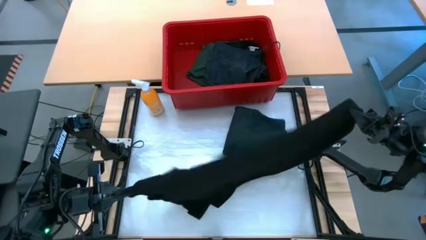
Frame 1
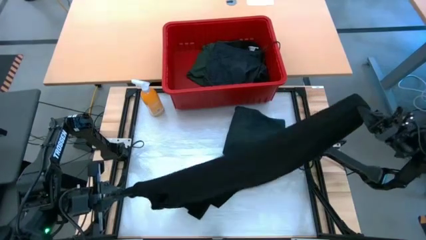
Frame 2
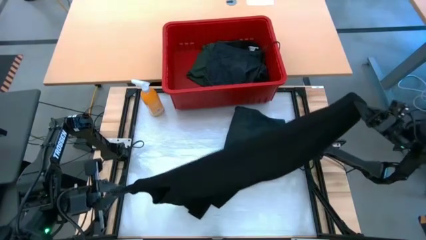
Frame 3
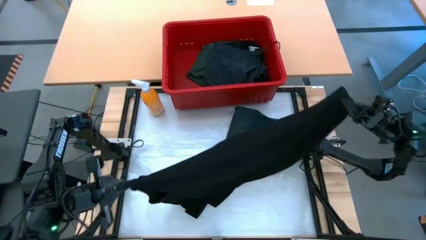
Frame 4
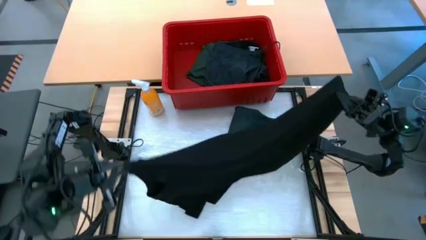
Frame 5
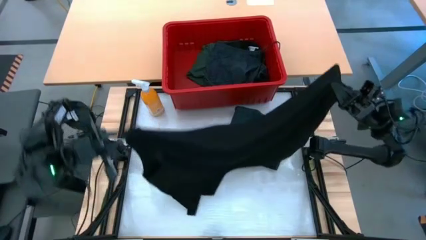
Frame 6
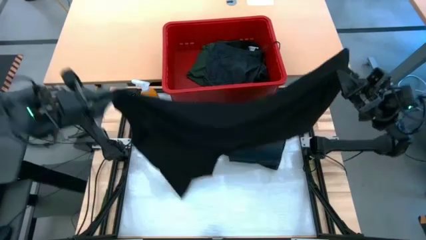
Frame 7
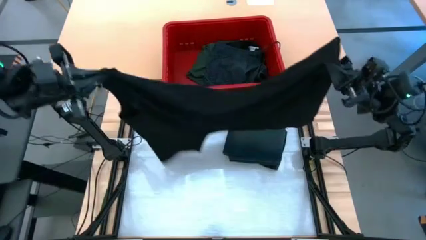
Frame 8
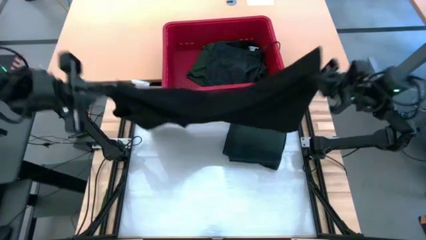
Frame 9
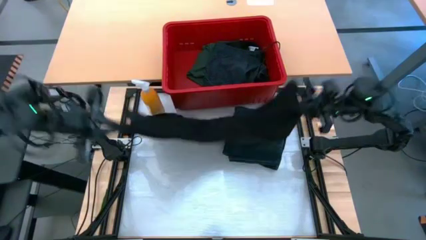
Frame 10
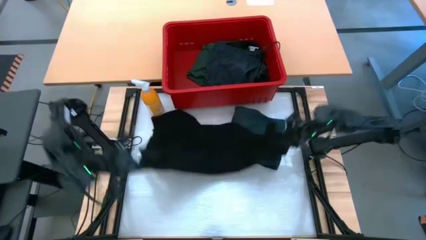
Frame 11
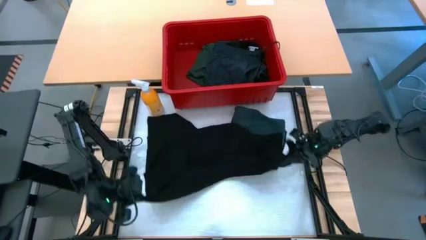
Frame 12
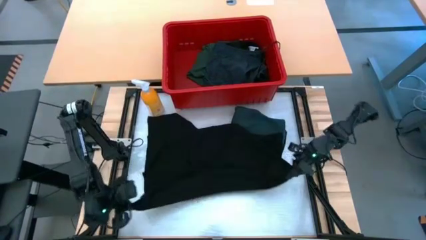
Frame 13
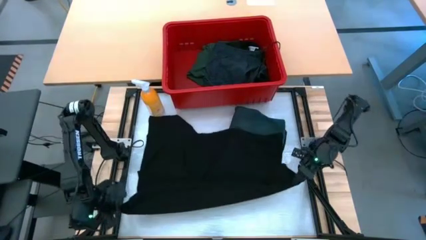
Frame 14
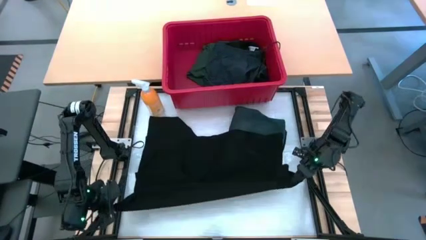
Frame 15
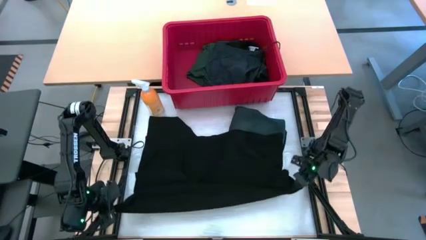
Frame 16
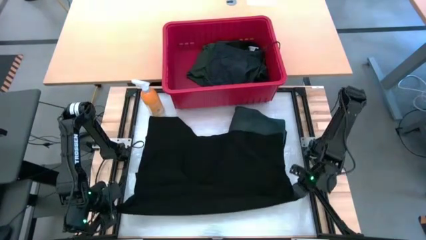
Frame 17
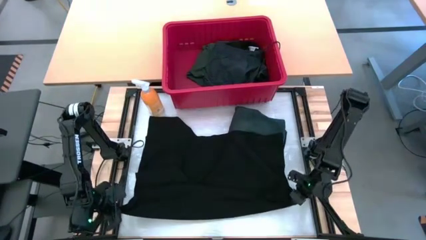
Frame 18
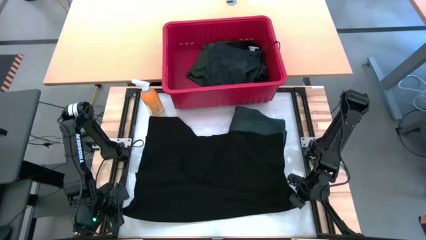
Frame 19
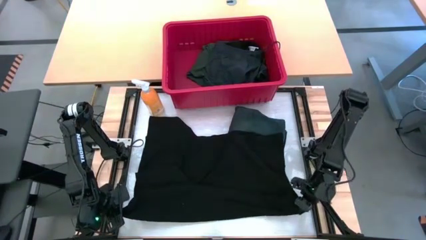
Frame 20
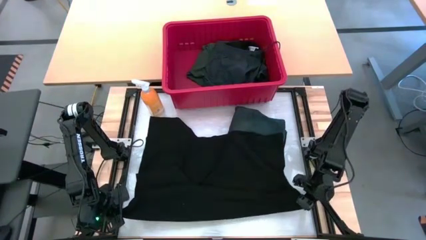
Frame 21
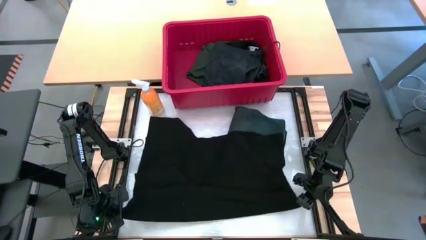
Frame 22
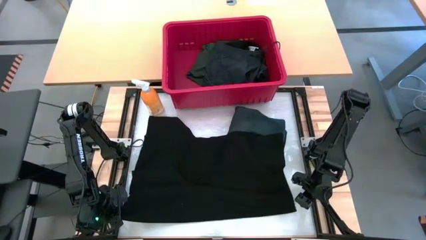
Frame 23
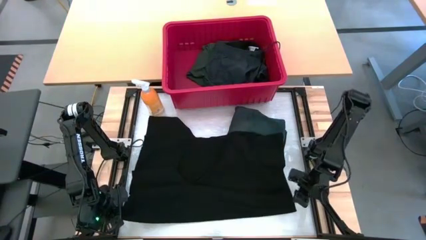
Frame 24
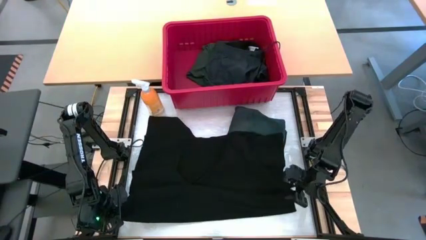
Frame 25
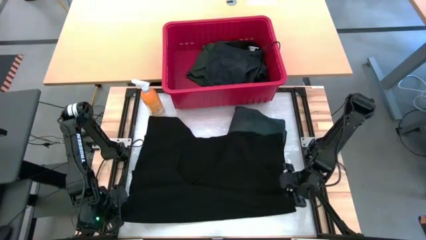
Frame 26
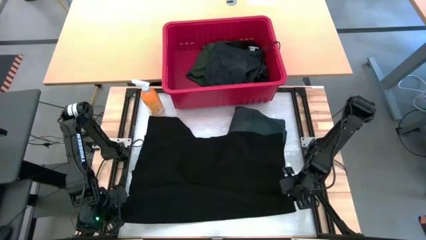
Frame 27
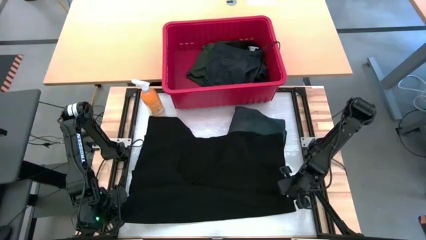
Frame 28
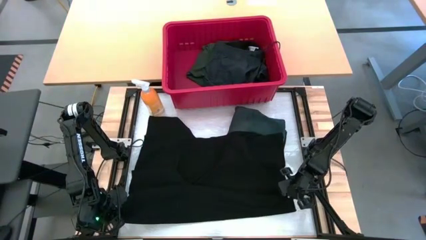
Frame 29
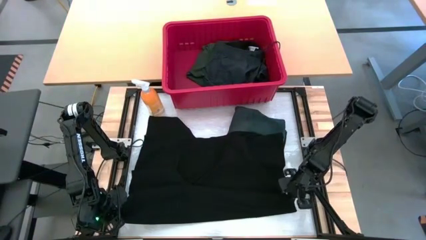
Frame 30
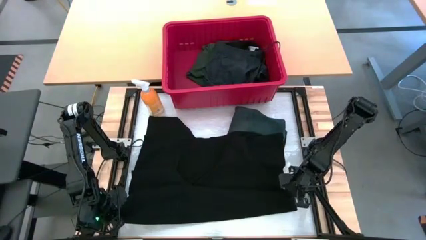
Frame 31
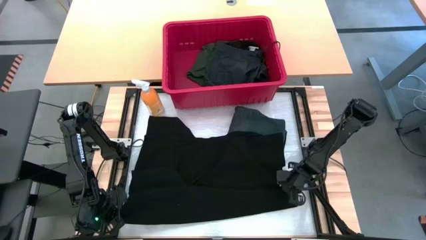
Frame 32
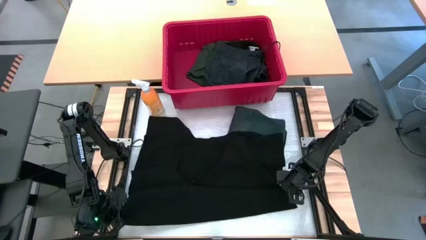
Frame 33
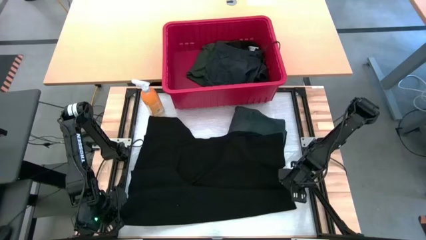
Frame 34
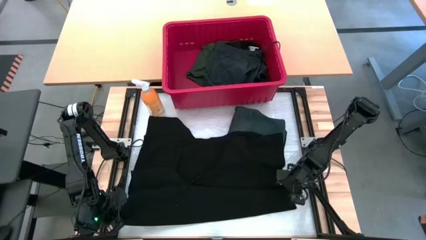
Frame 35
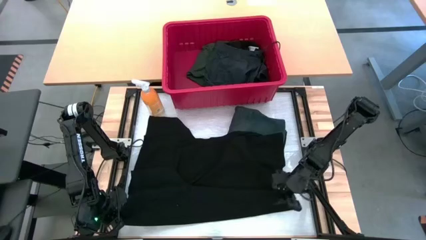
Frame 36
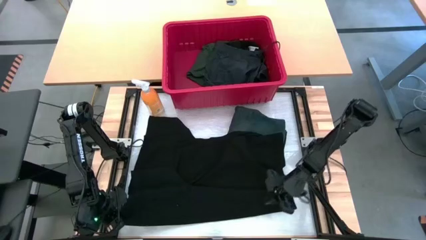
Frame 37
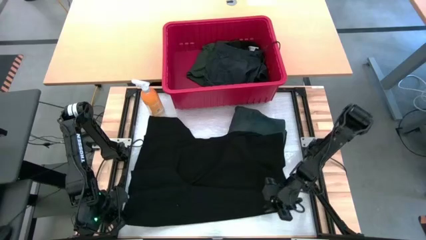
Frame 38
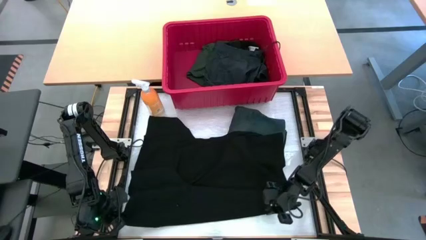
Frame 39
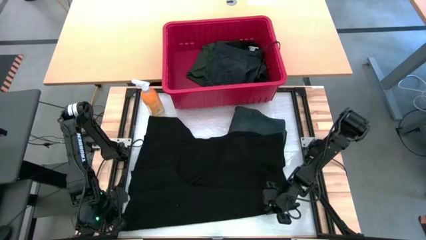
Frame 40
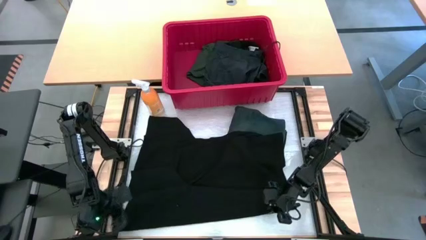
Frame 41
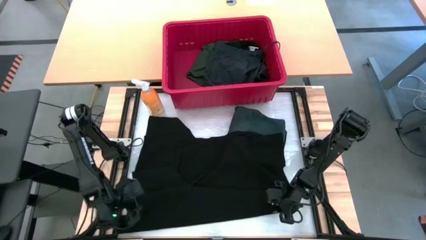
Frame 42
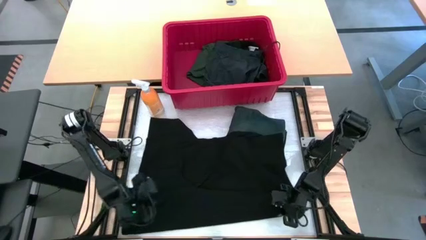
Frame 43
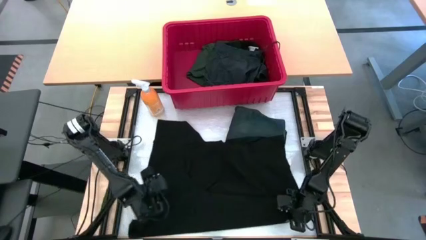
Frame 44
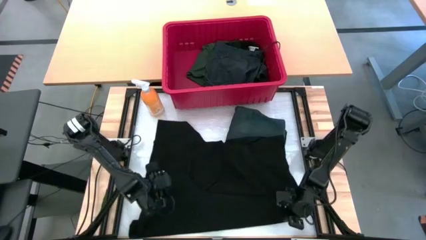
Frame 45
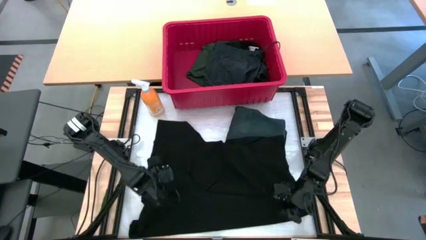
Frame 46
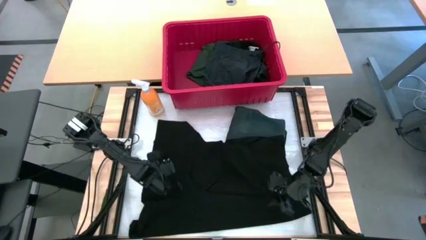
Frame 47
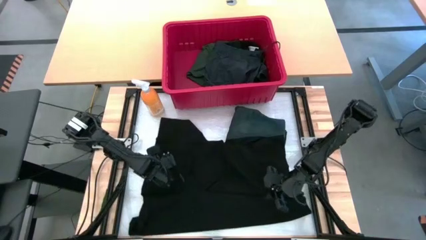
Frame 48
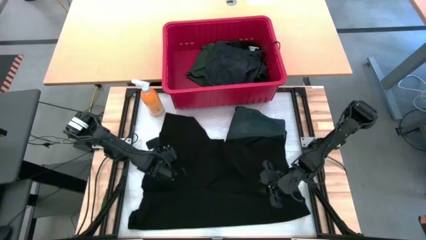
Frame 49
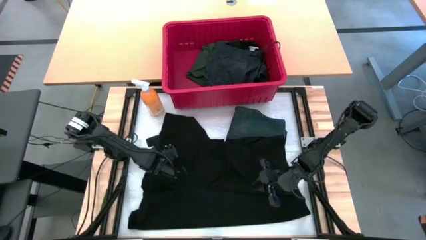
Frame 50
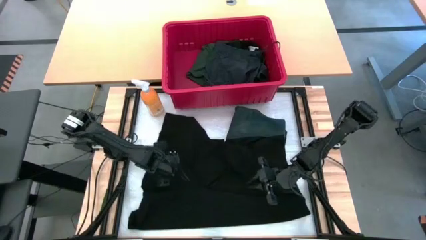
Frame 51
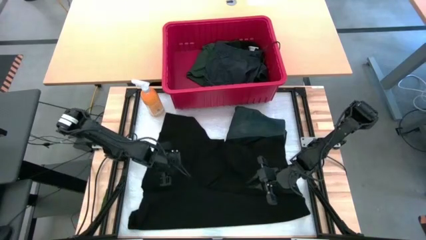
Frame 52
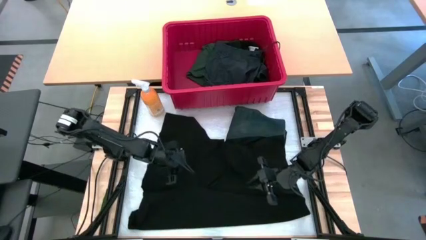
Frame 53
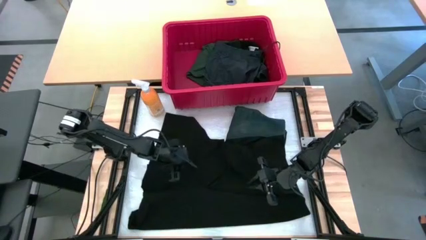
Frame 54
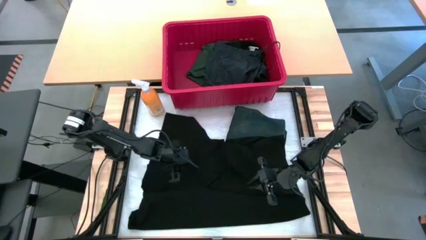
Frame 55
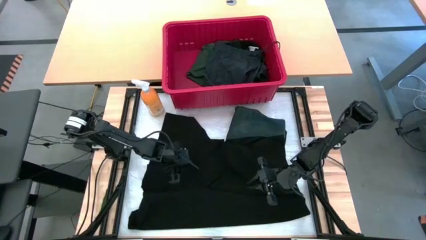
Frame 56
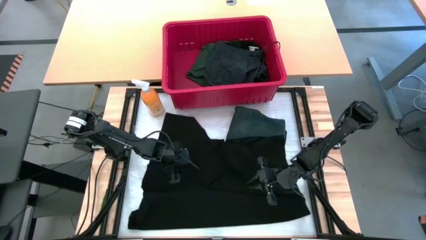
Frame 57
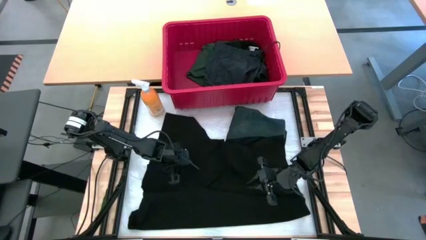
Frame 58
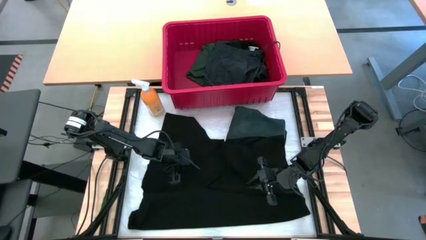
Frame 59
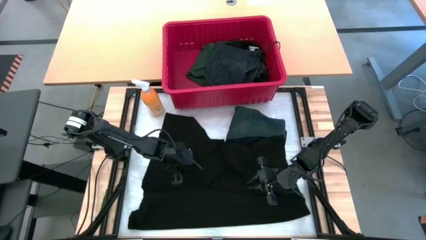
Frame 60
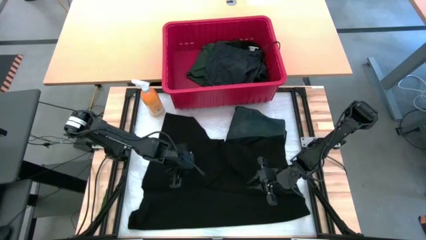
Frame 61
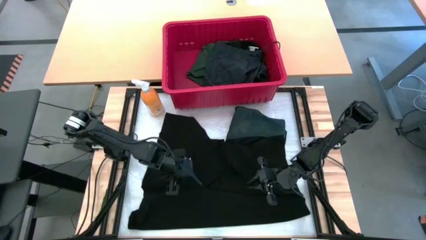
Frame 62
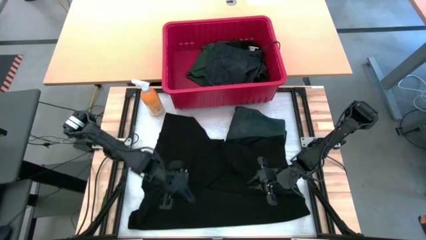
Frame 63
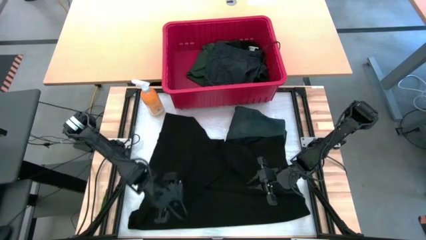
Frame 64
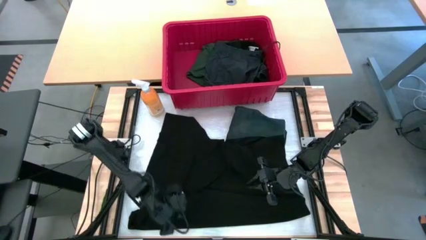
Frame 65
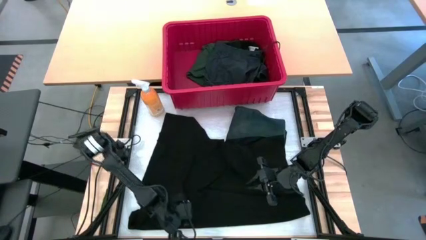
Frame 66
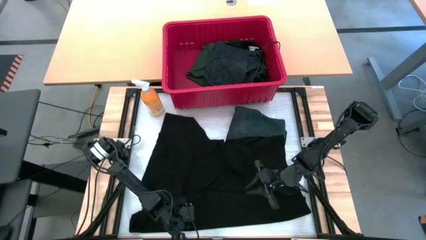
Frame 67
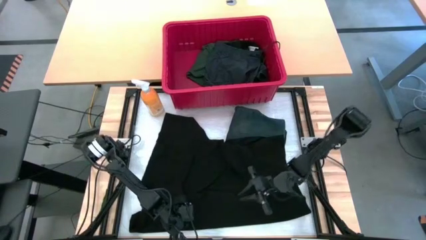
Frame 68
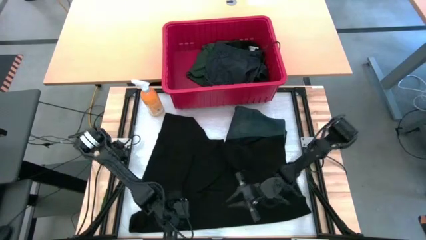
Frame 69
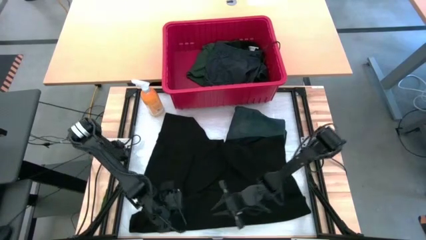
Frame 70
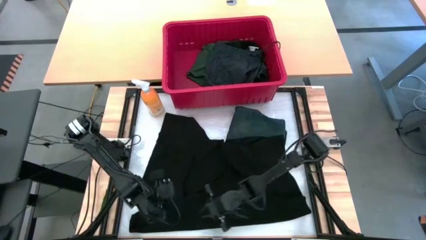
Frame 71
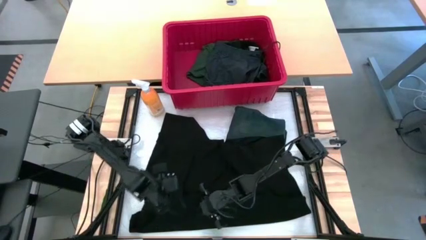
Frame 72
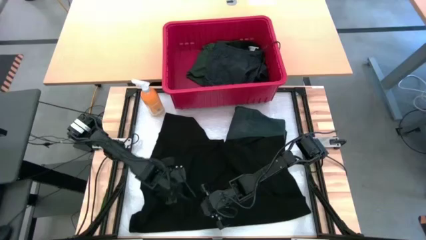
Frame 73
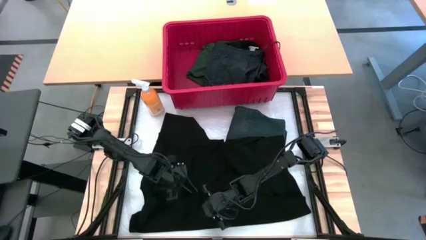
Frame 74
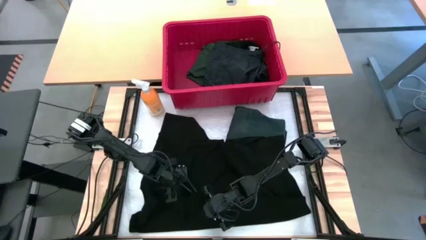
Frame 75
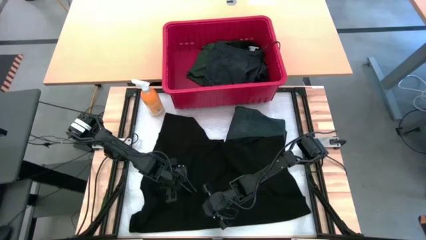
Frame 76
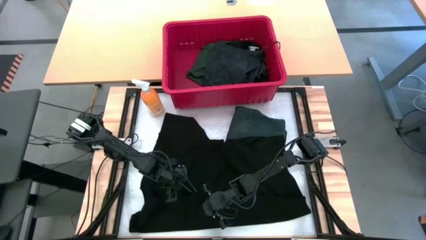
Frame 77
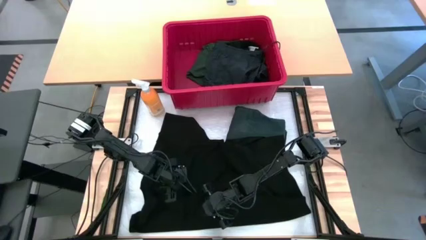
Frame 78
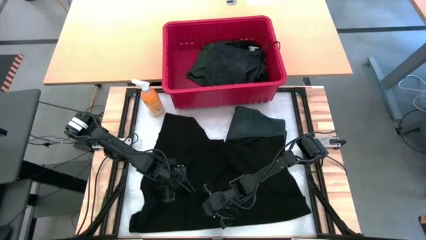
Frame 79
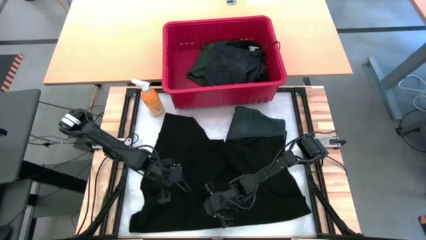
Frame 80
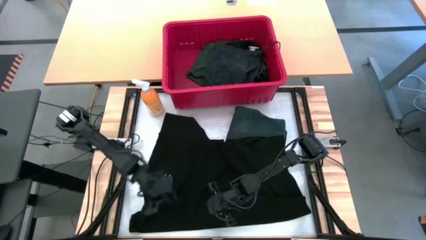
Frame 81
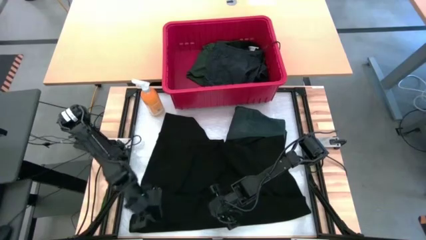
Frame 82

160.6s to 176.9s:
Task: Fold Laundry from Bin
Fold the black shirt
